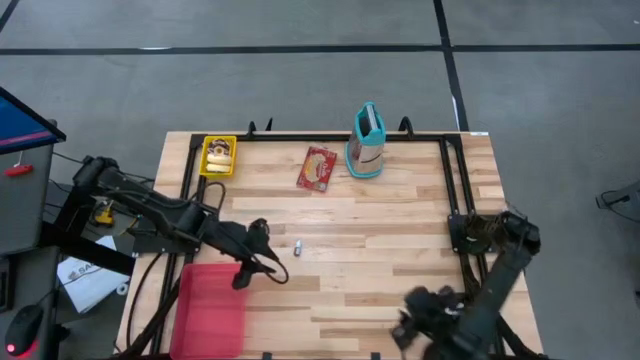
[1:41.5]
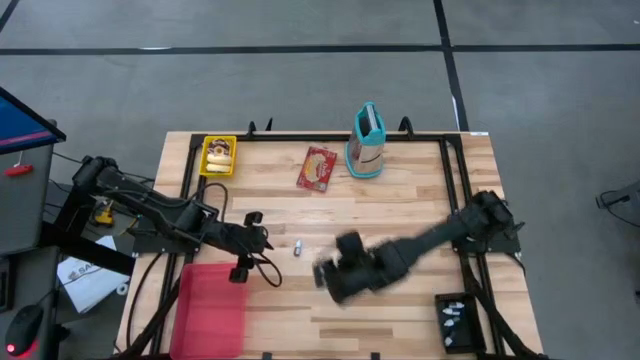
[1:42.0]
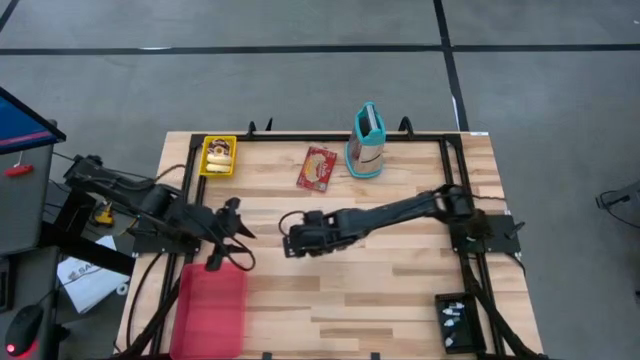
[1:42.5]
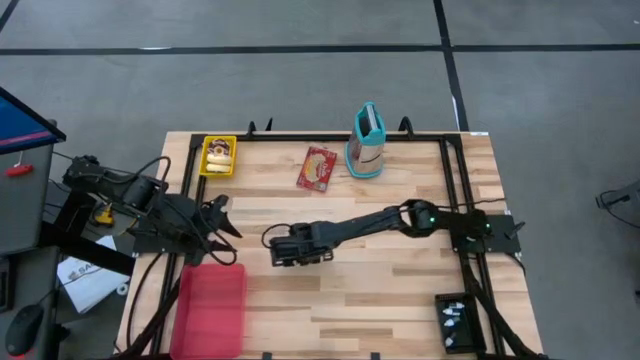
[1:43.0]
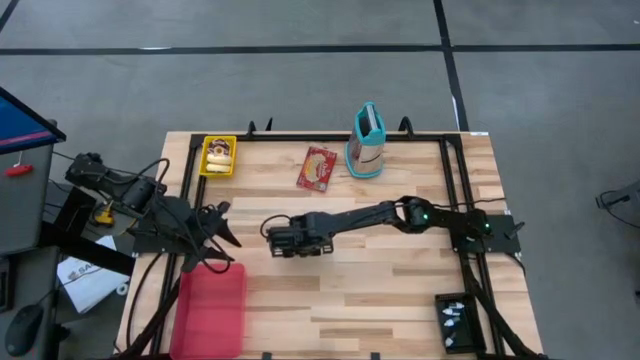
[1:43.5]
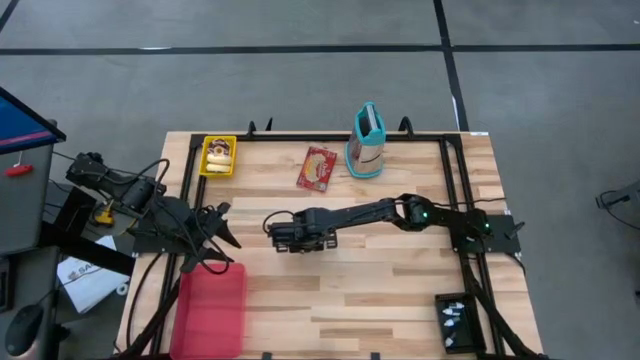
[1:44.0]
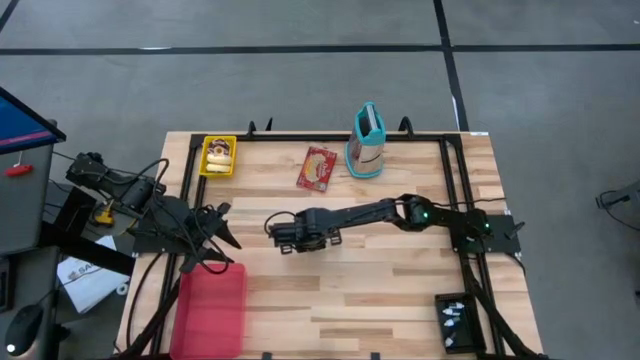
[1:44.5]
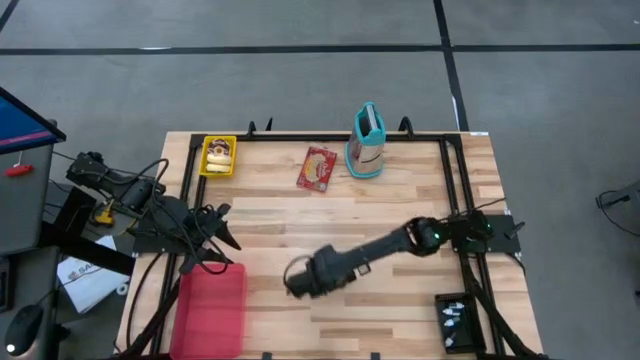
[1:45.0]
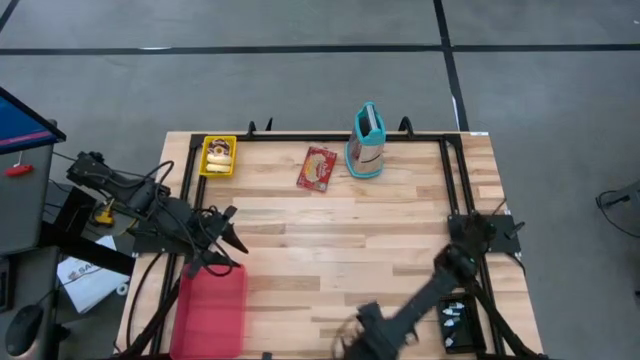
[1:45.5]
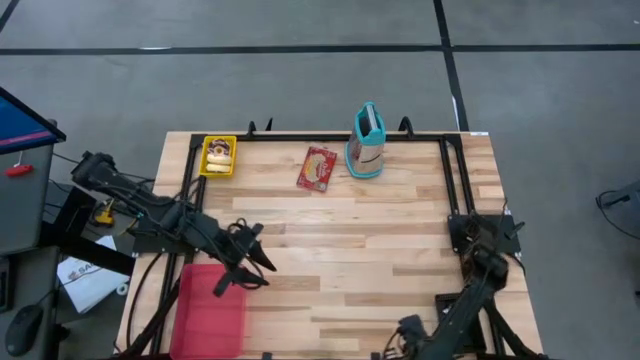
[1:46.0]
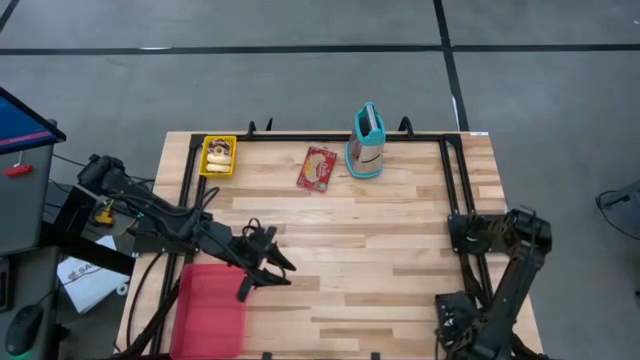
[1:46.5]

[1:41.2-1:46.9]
Put the red food coloring bottle in the black basket

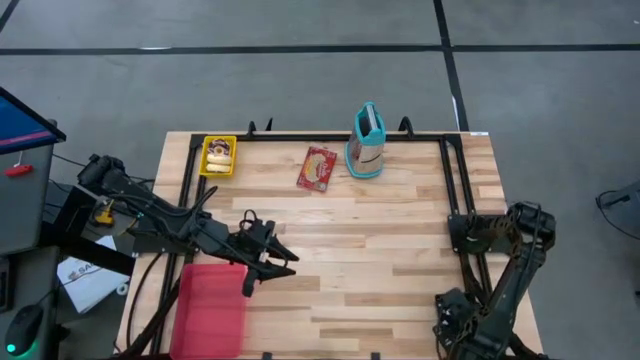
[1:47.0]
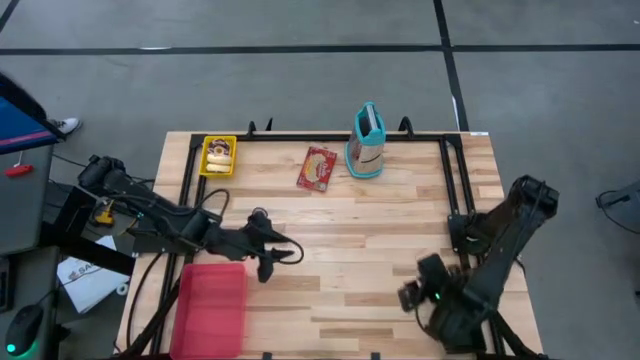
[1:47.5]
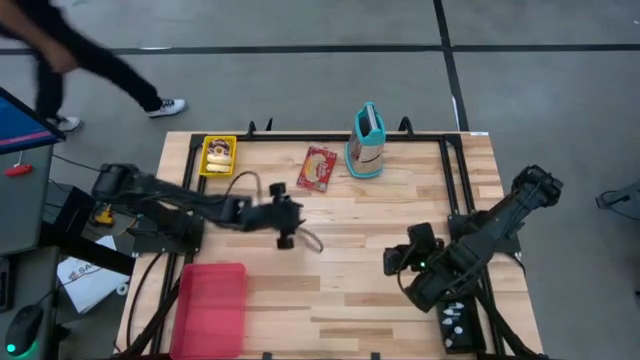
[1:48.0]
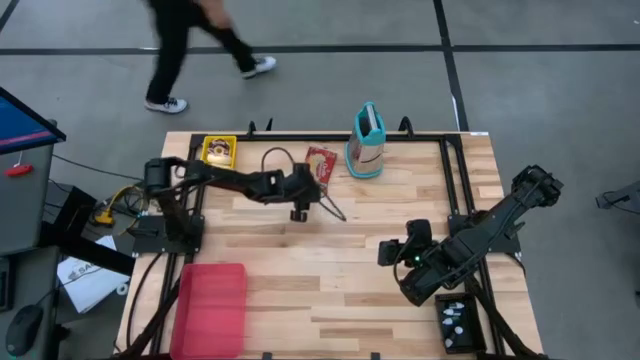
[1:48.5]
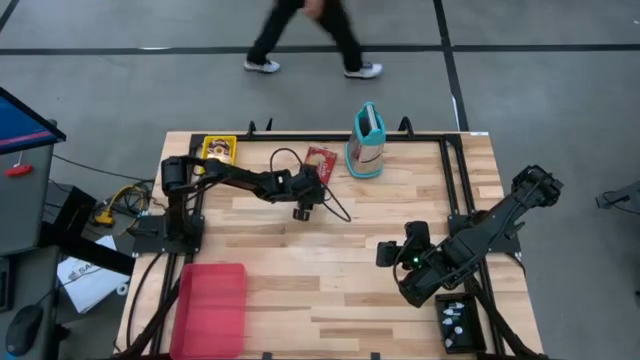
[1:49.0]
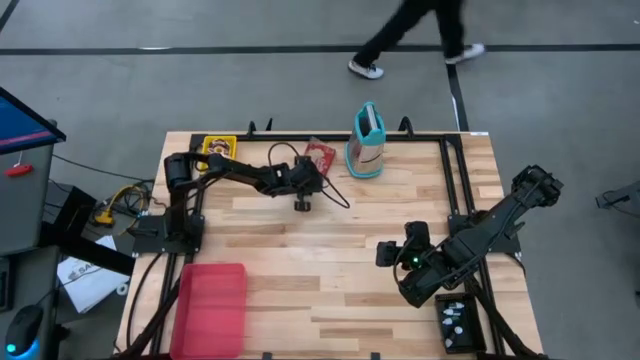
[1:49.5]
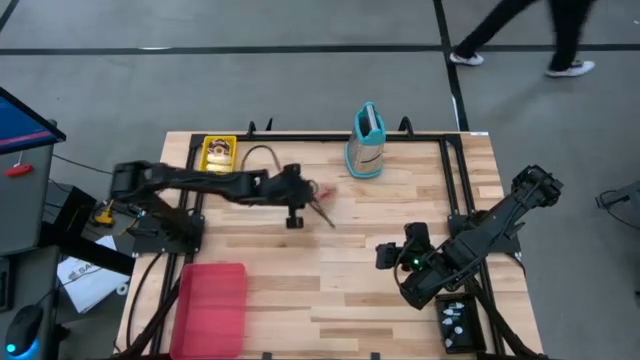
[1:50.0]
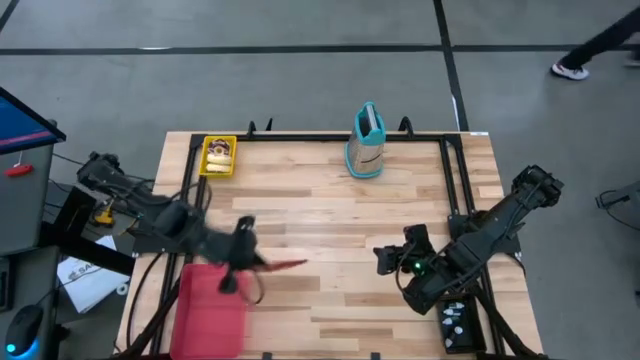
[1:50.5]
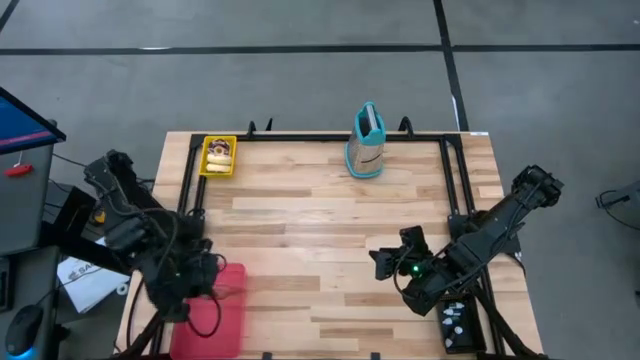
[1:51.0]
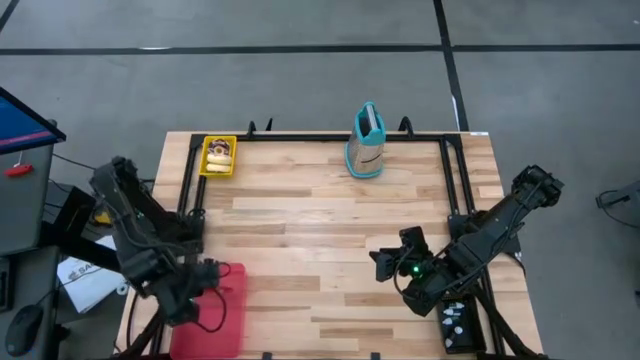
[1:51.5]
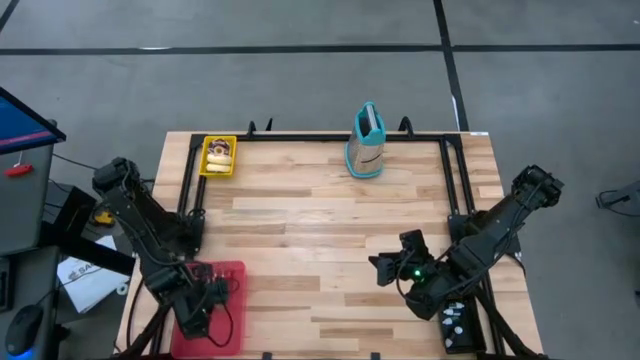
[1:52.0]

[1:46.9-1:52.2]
Put the red popcorn bag in the red bin

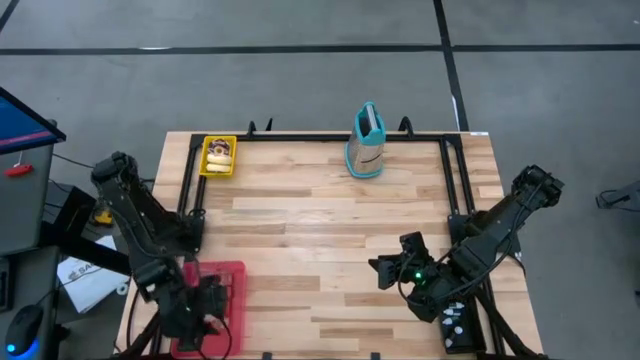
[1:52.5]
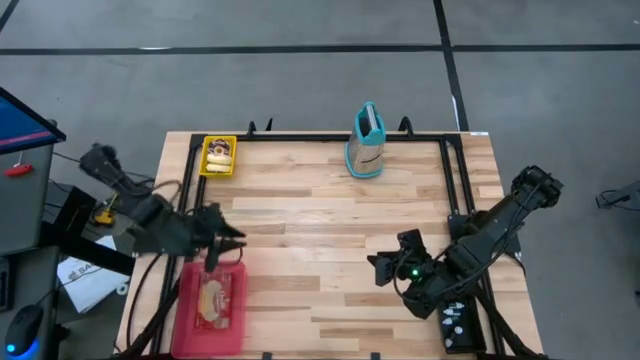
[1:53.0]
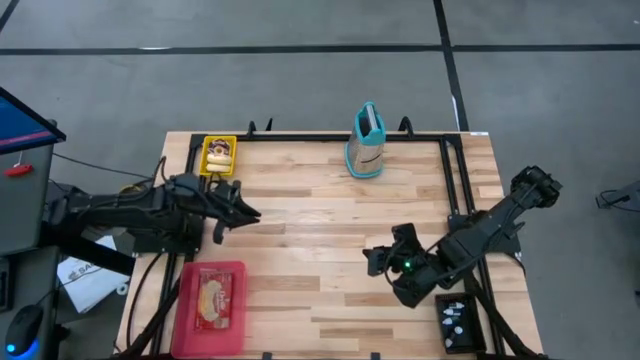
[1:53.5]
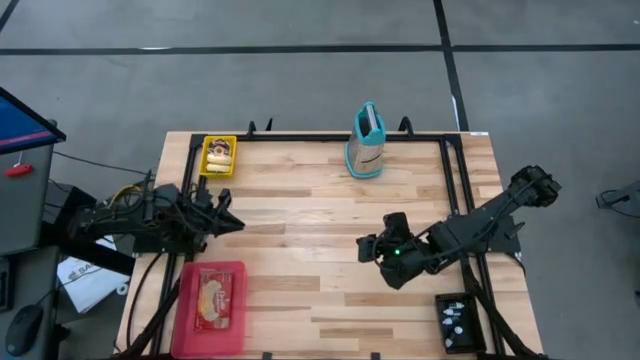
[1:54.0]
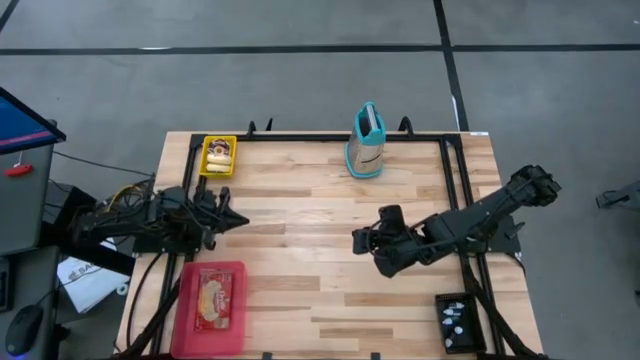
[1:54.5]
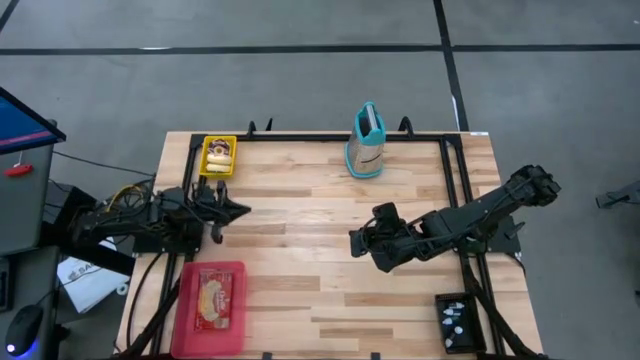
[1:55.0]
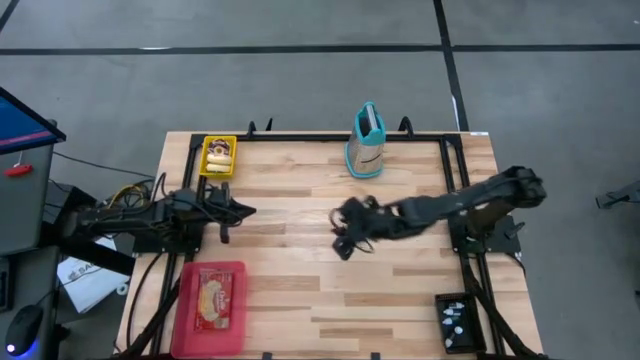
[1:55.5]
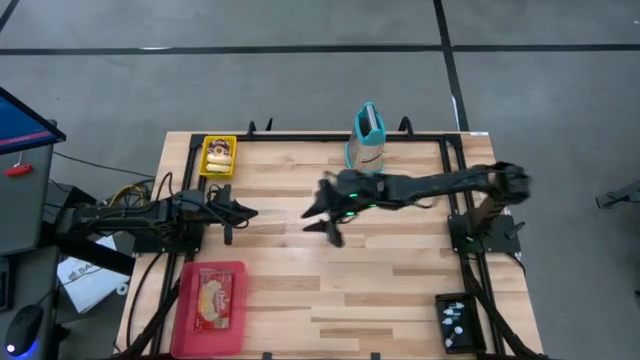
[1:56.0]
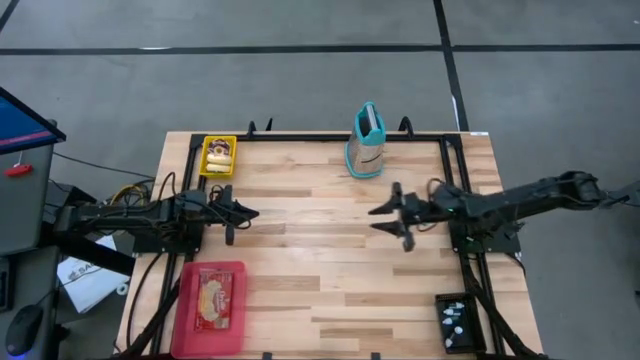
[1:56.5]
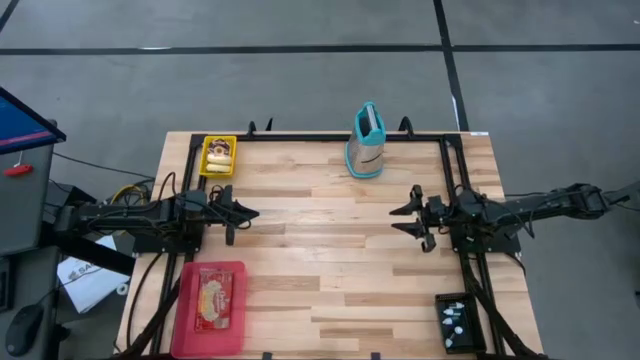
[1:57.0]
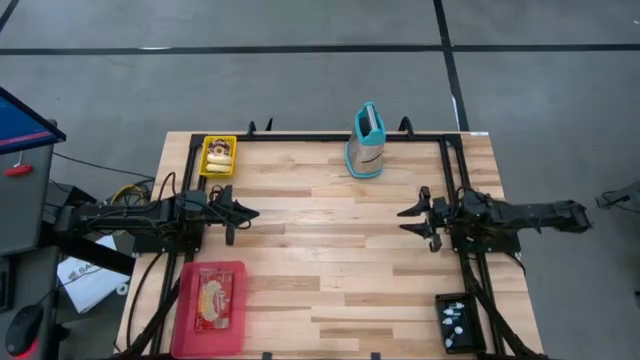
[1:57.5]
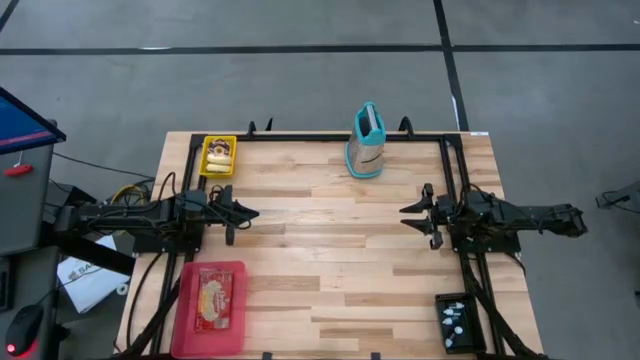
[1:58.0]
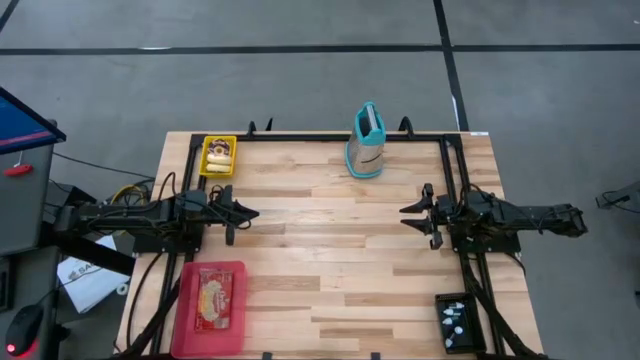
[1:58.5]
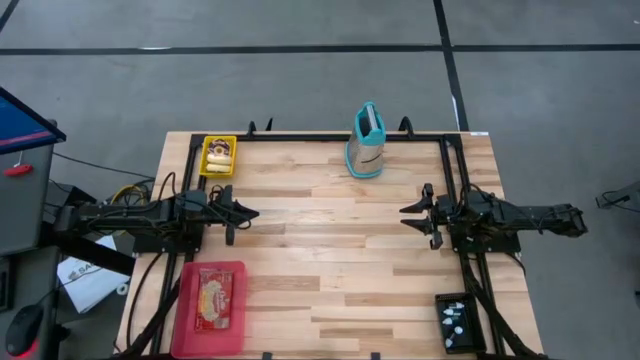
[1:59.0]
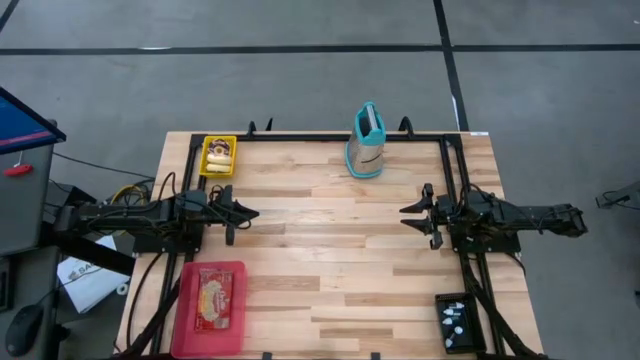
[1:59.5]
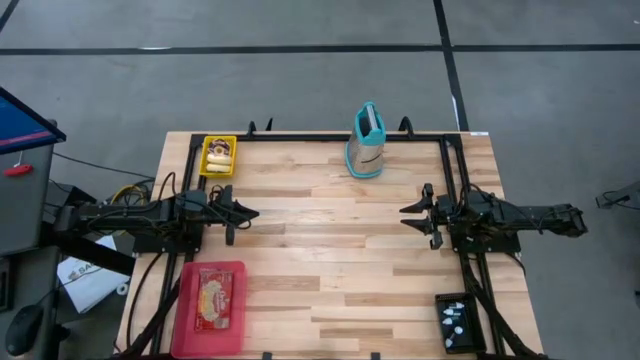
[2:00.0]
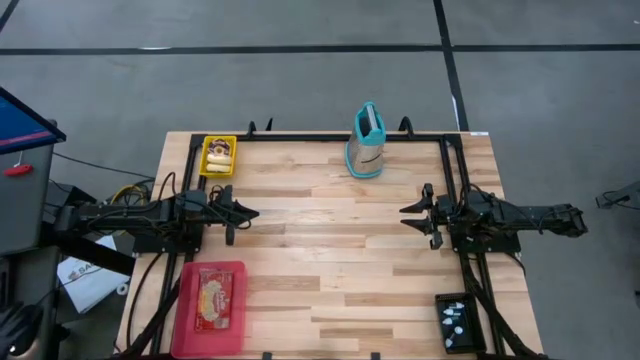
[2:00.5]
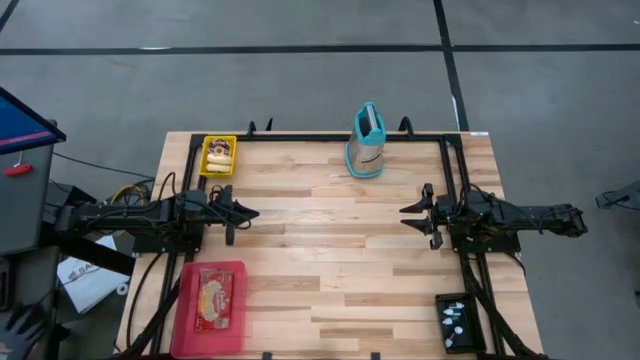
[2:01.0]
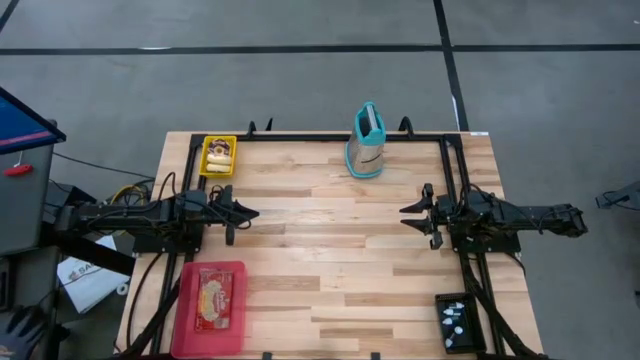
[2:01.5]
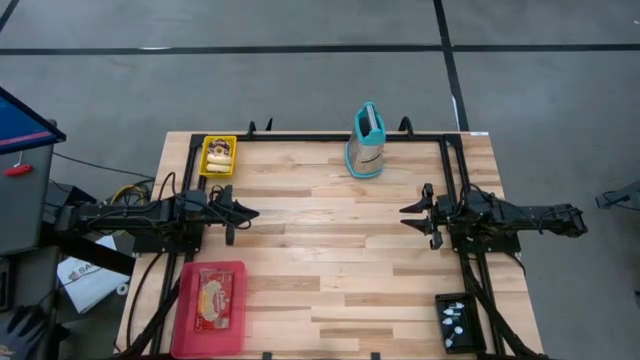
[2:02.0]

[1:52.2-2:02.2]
Return to Home Position
